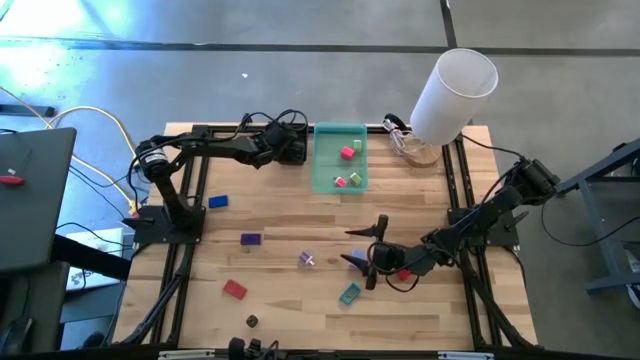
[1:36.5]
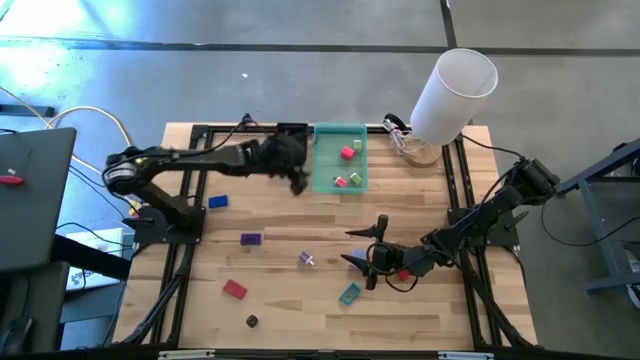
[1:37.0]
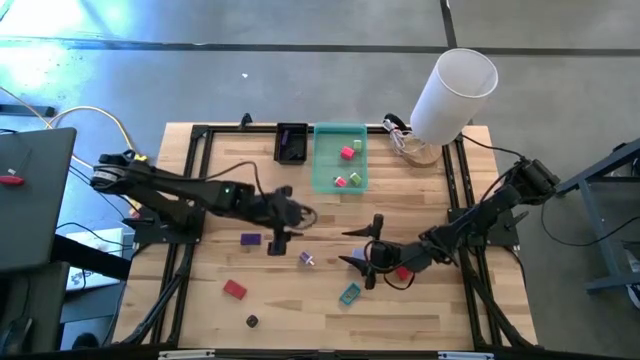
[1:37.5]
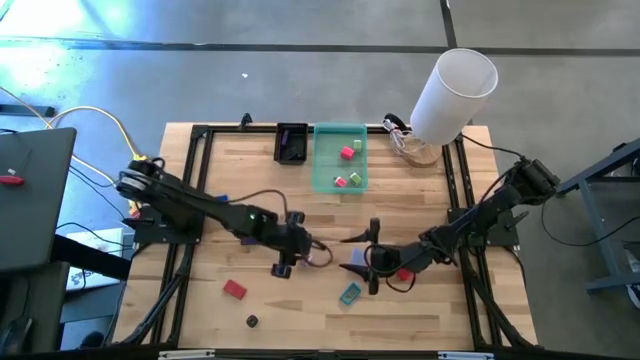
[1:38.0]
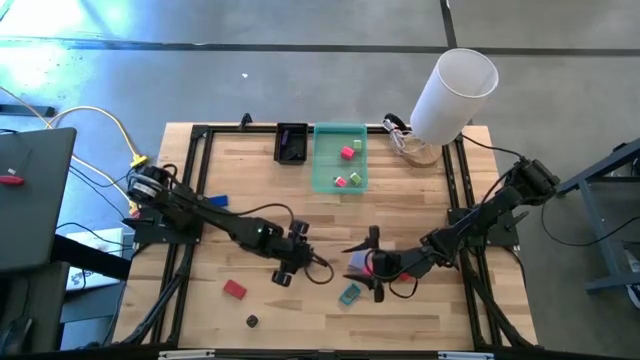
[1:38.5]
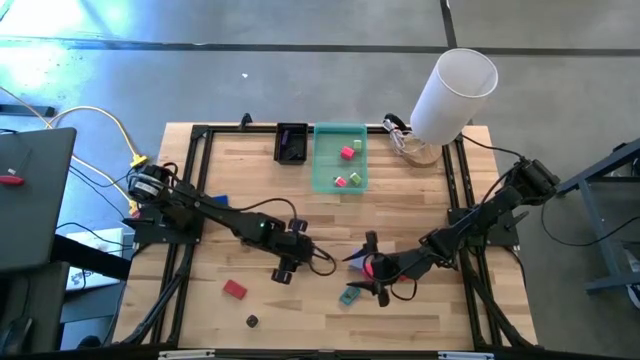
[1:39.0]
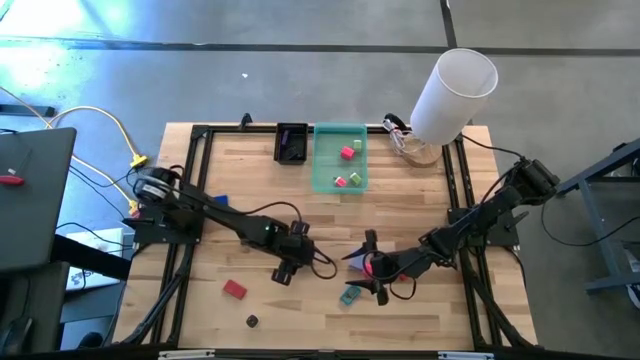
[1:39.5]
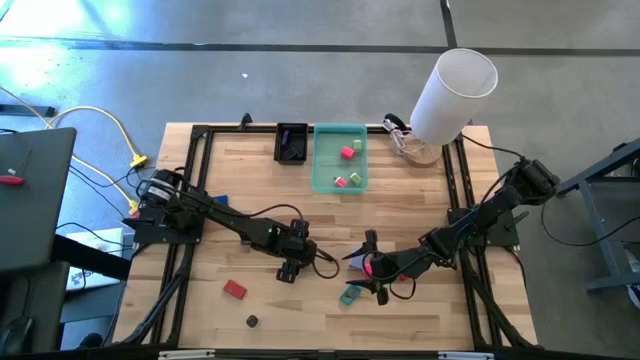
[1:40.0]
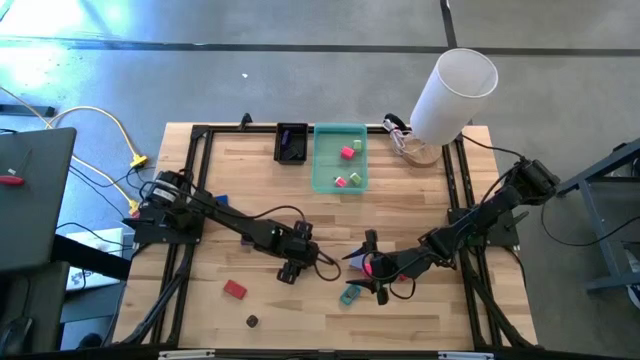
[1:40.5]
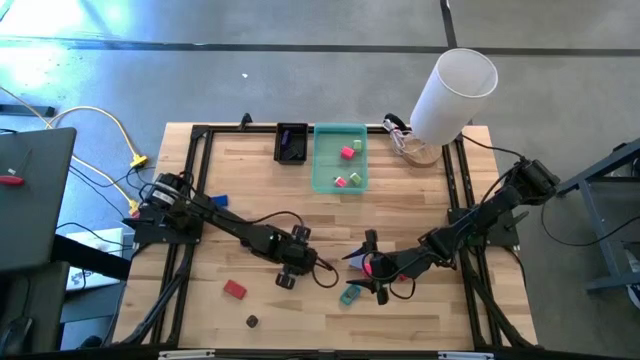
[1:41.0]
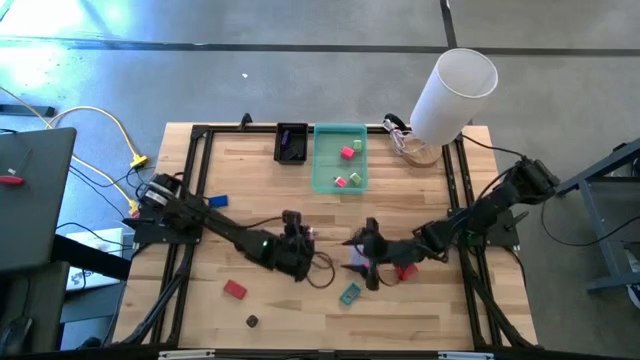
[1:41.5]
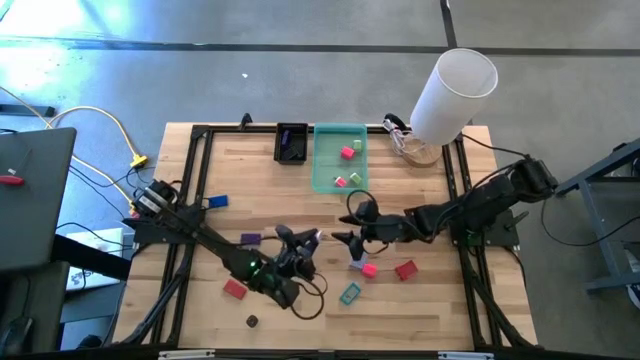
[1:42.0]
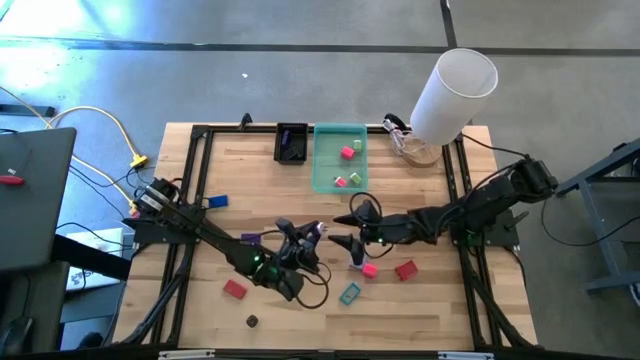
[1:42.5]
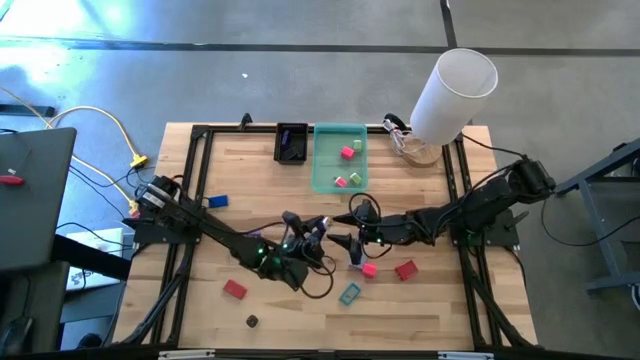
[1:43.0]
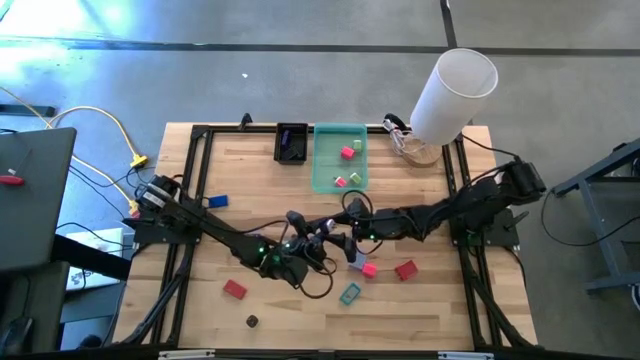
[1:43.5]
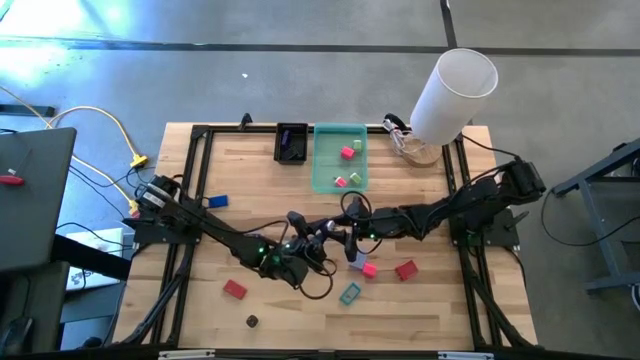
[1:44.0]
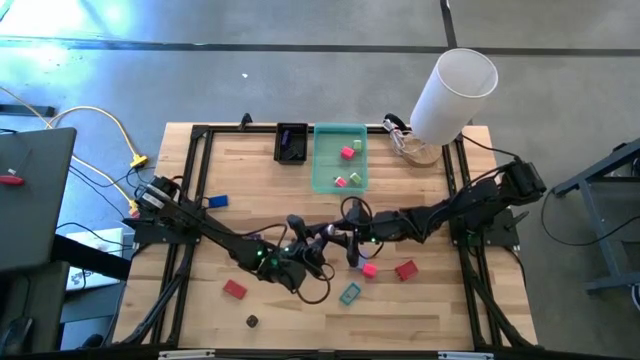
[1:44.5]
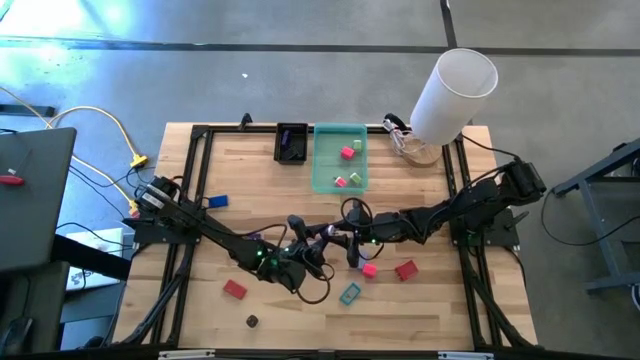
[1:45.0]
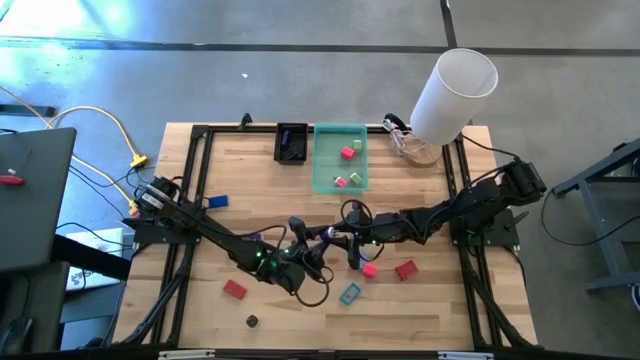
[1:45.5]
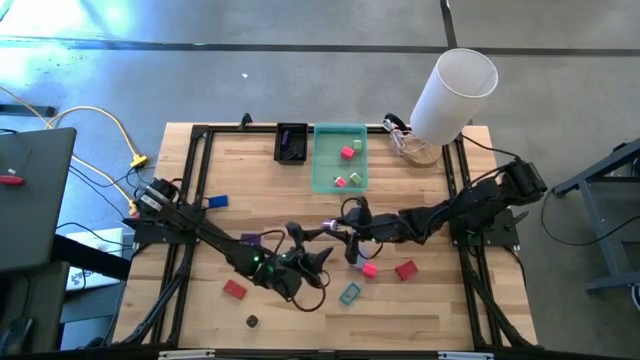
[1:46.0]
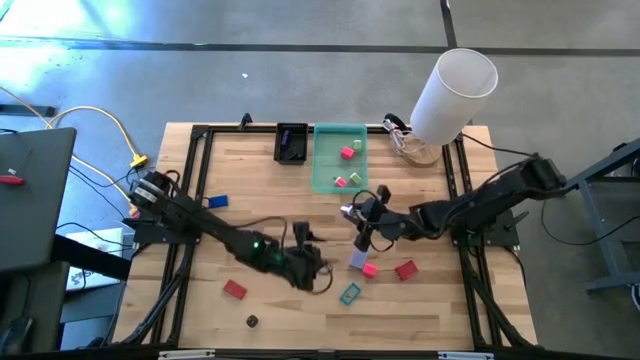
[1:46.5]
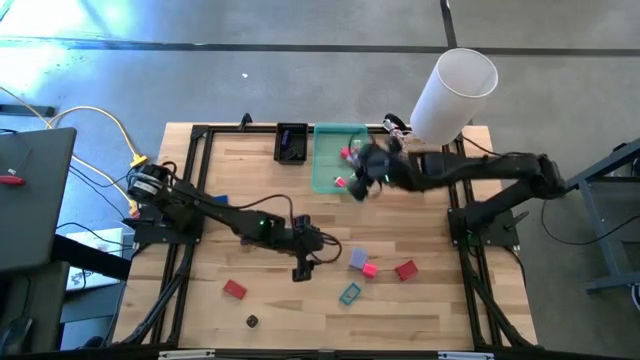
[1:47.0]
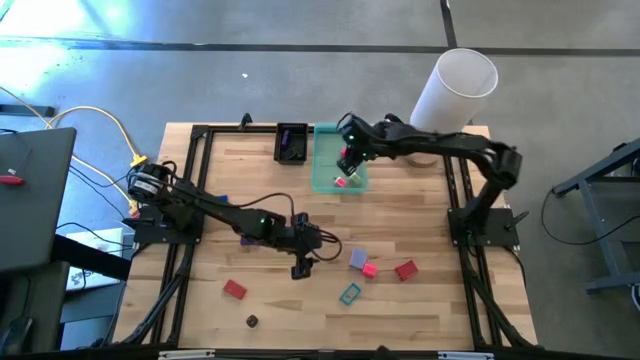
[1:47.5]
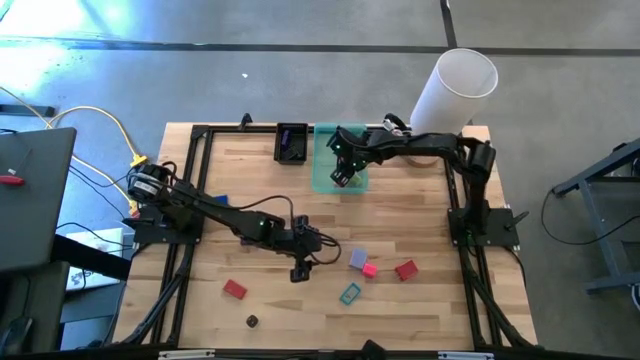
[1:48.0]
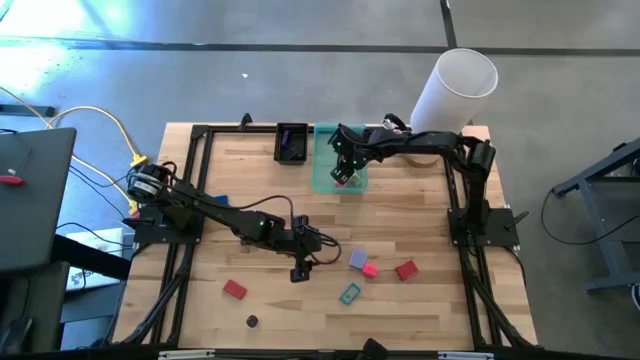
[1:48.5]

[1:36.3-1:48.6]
Task: Pick & Place Office items
Put the purple charger adapter into the green bin

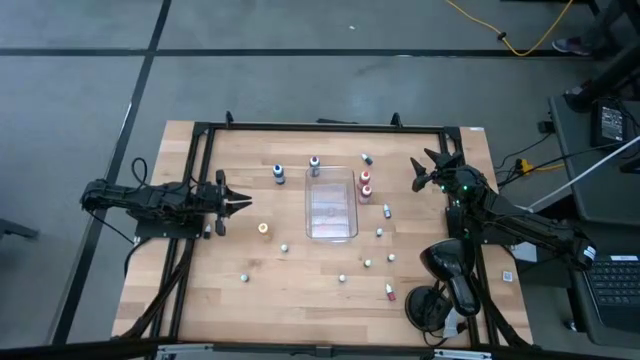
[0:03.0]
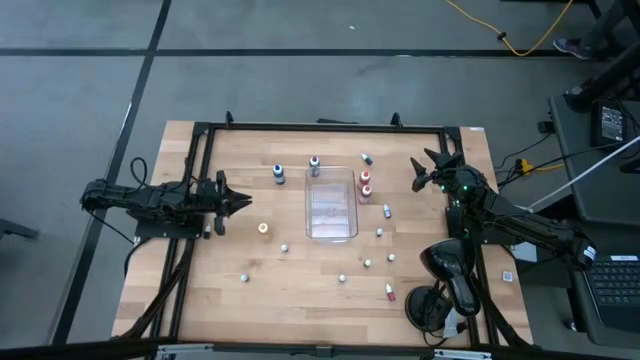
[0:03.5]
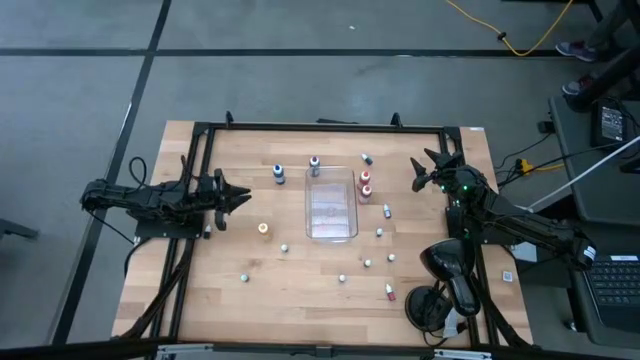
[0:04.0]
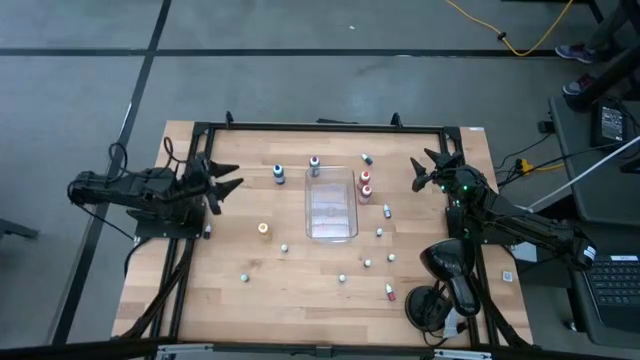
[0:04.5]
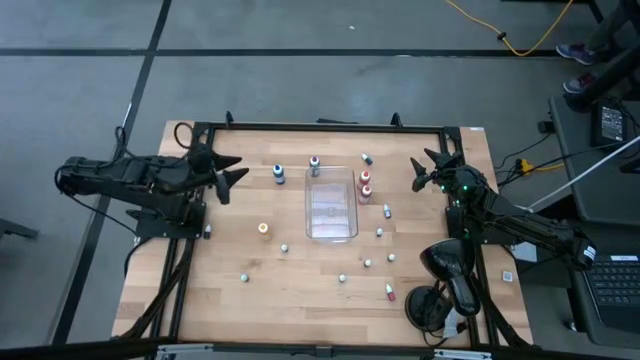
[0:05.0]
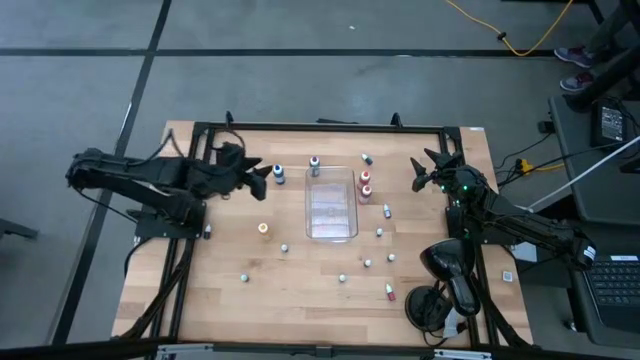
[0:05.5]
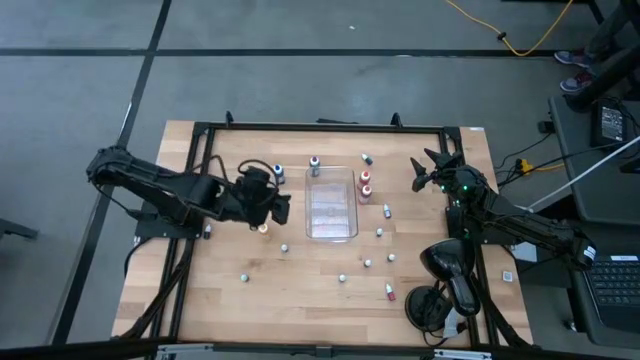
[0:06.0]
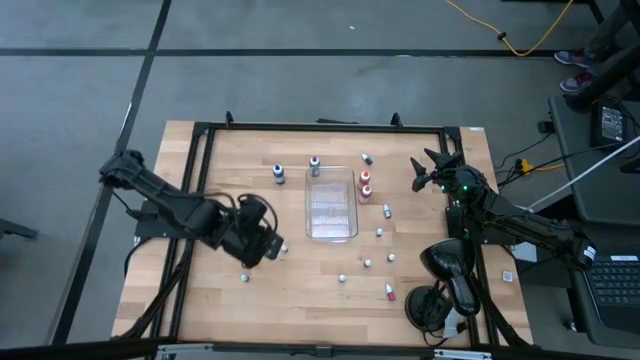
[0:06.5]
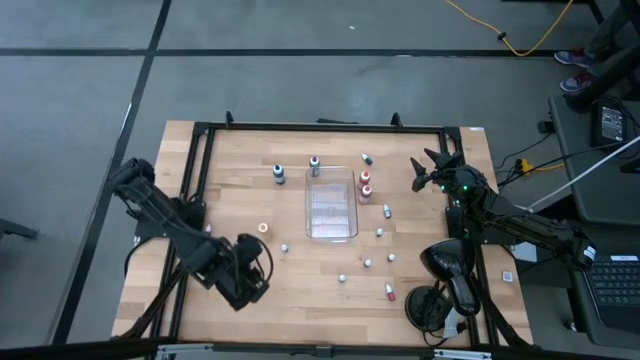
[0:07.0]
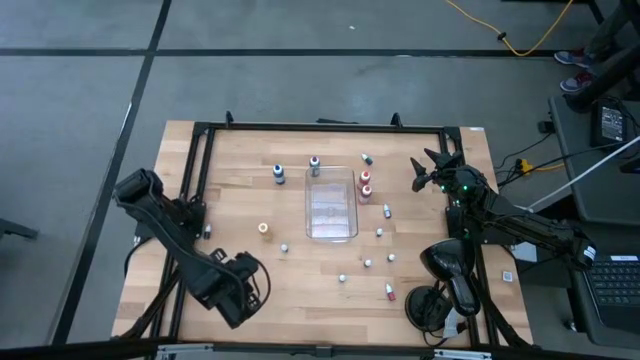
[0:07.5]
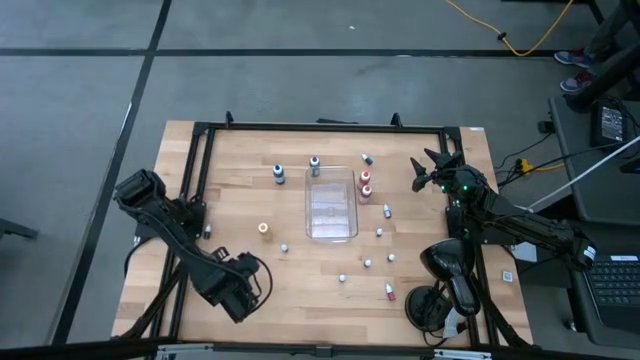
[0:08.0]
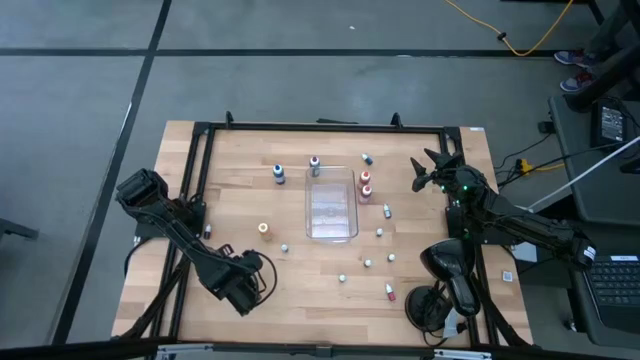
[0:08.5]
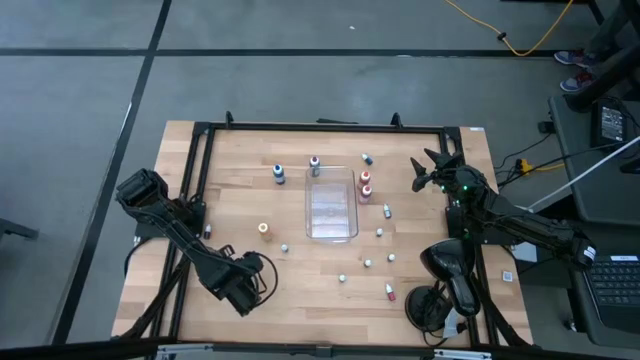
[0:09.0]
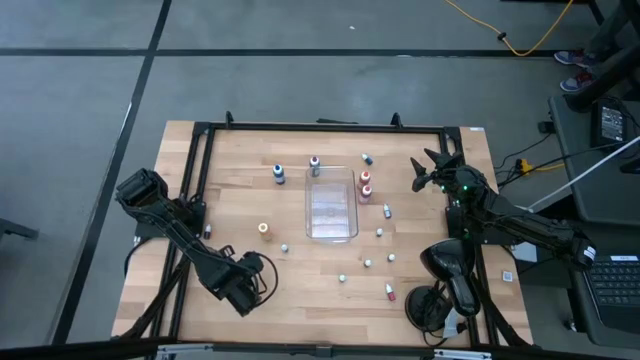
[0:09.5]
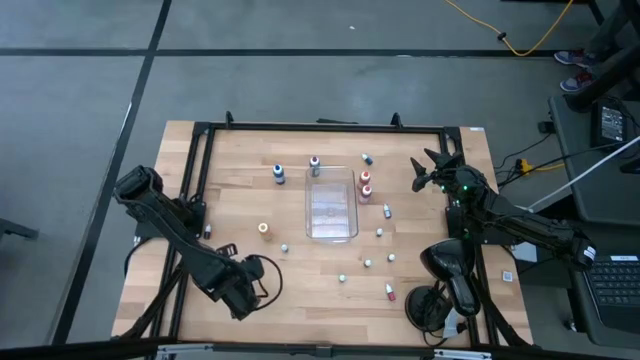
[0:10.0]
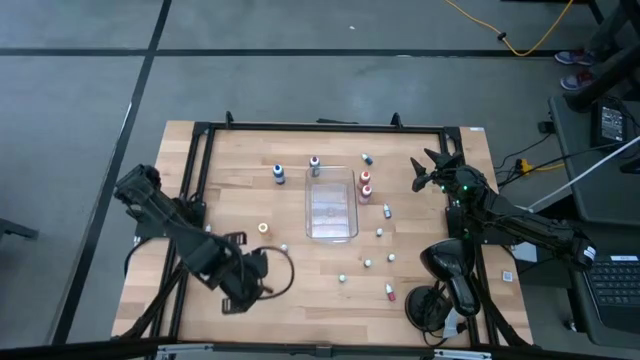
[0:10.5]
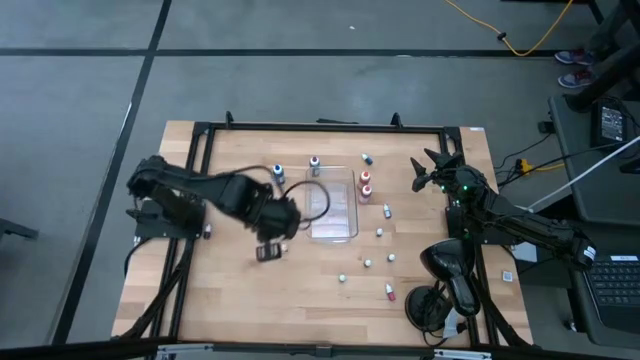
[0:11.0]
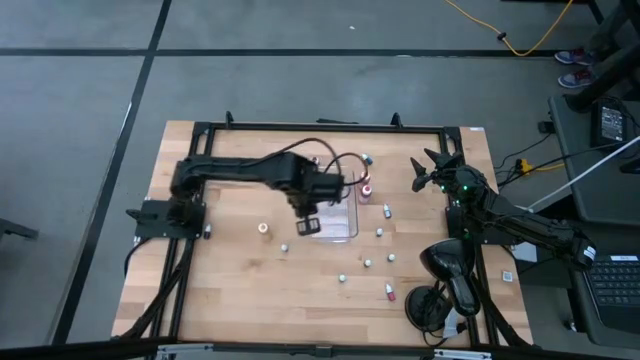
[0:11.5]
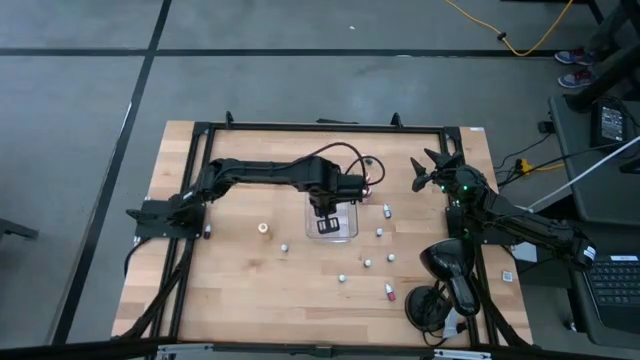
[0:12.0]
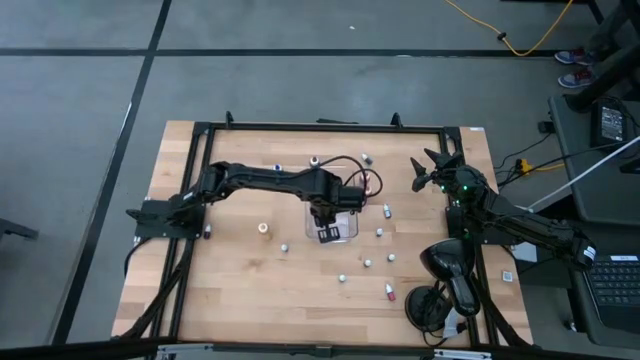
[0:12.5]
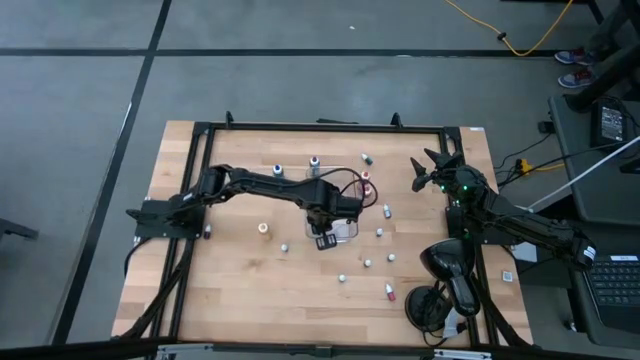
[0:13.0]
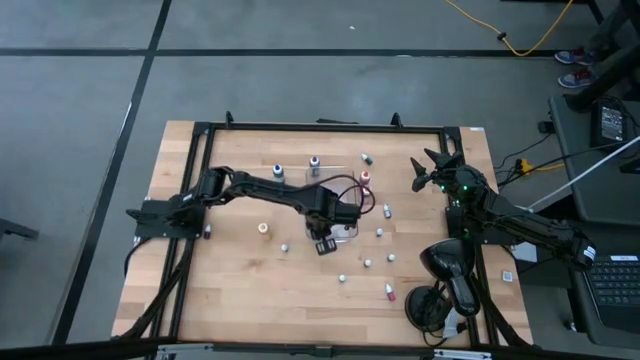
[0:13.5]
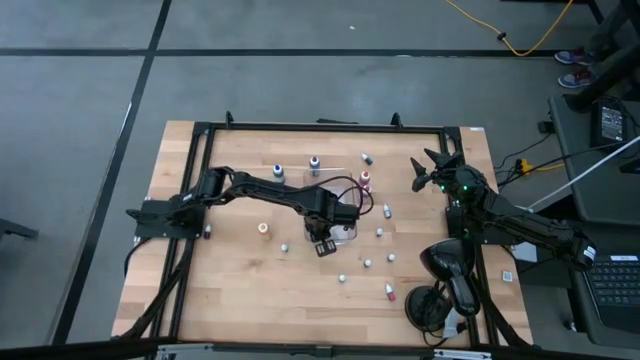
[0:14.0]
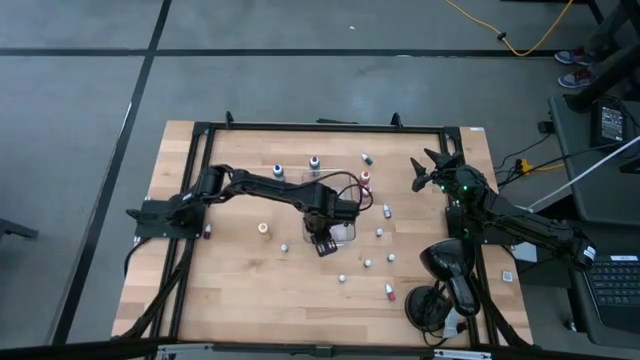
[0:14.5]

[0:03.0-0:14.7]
Task: Pick & Place food coloring
Put the bottom small blue food coloring bottle into the bottom of the bin
